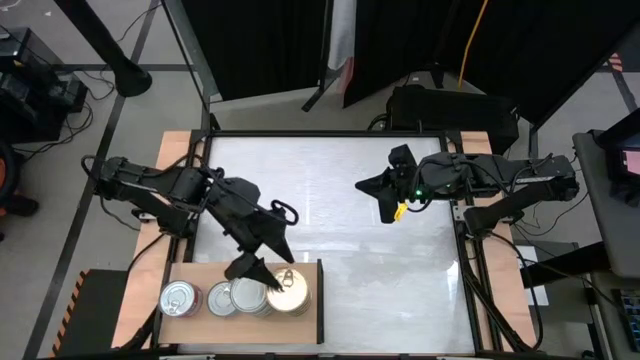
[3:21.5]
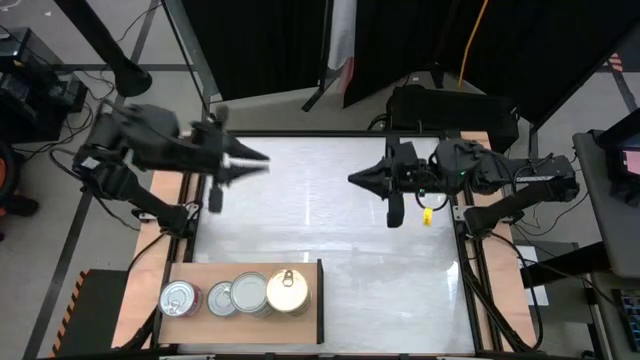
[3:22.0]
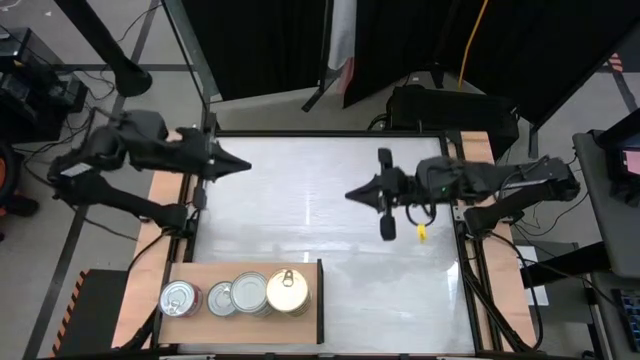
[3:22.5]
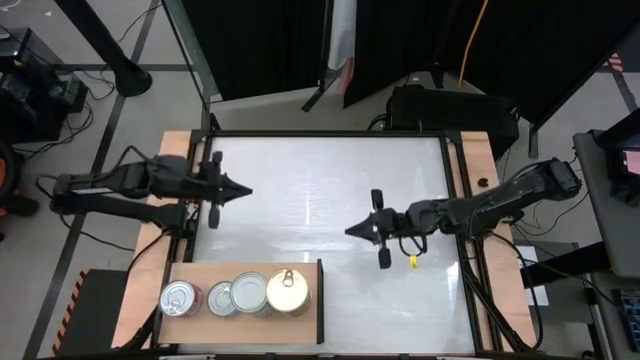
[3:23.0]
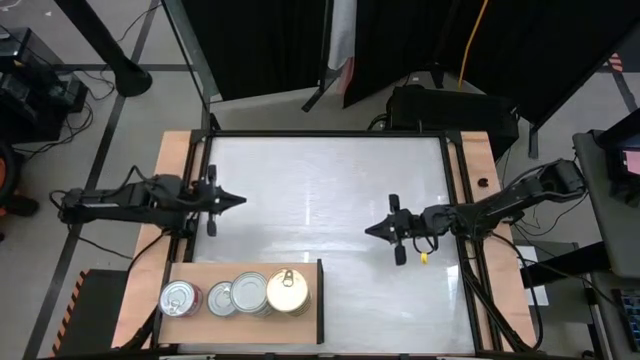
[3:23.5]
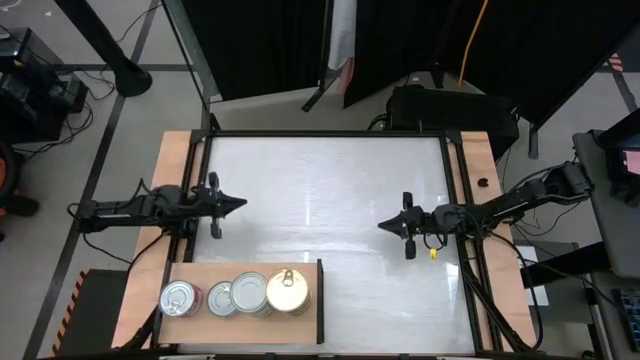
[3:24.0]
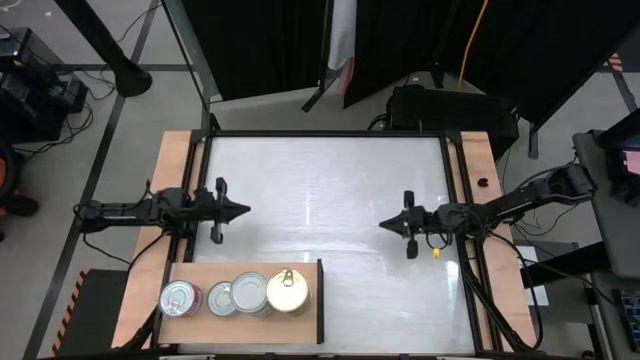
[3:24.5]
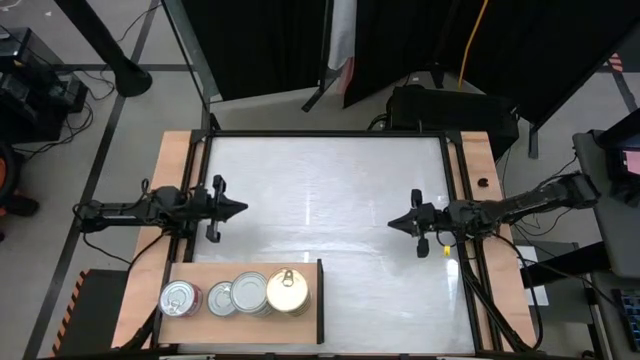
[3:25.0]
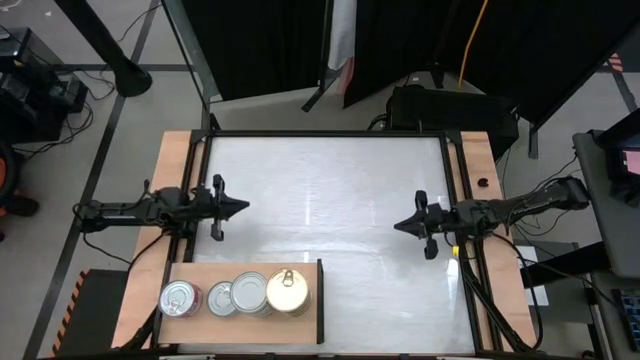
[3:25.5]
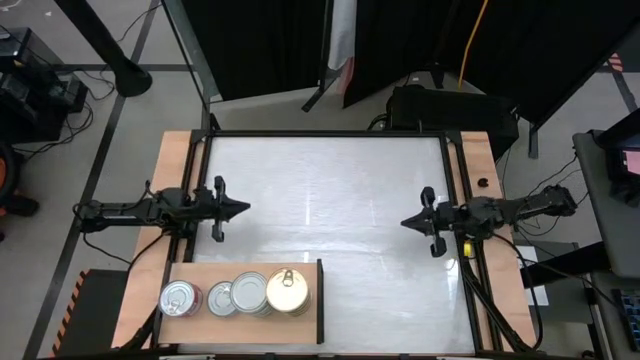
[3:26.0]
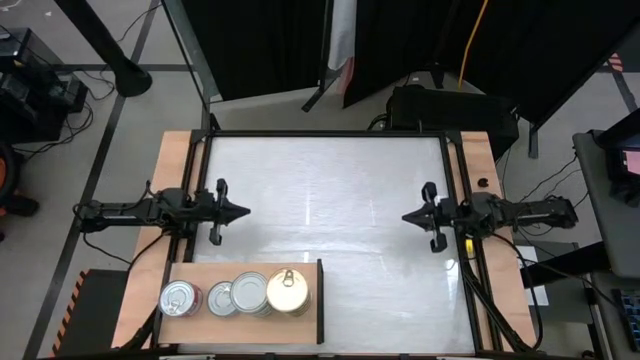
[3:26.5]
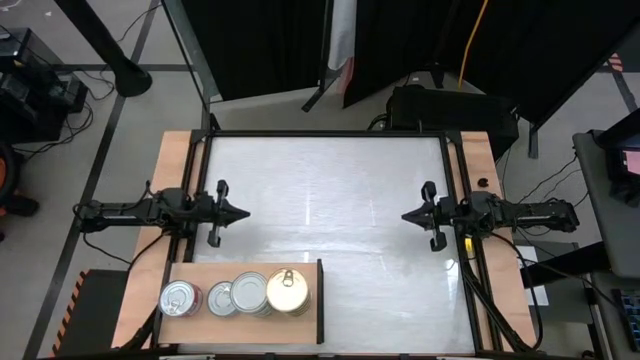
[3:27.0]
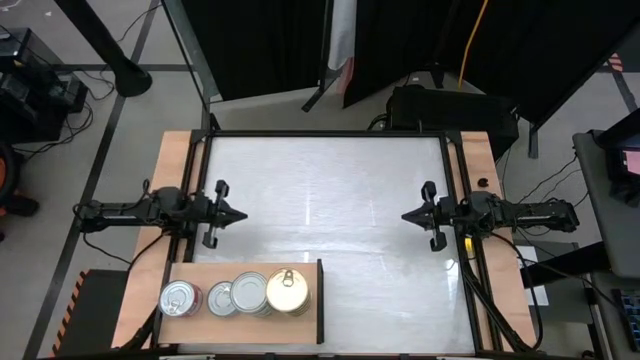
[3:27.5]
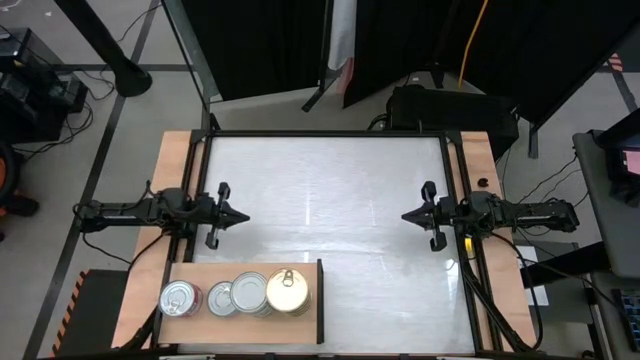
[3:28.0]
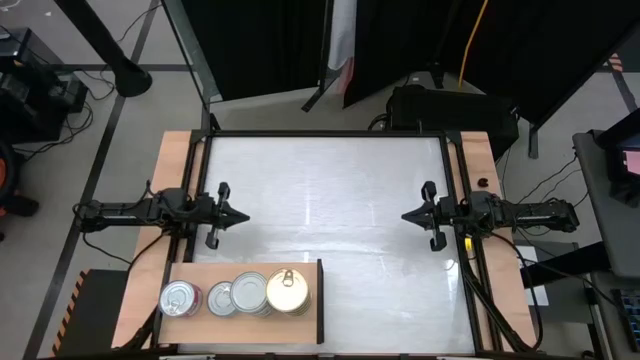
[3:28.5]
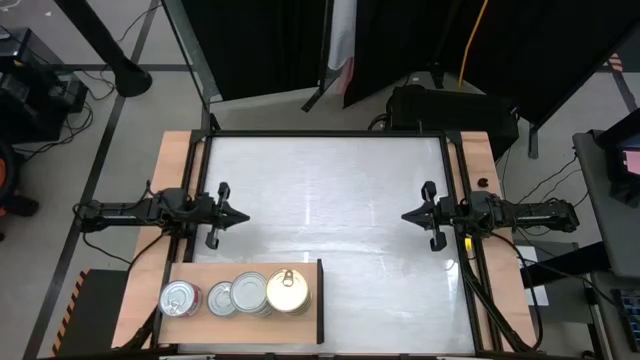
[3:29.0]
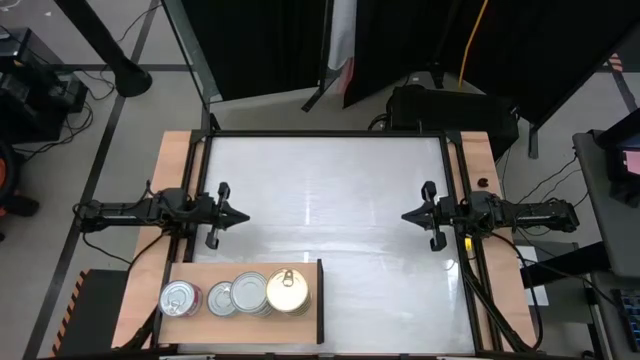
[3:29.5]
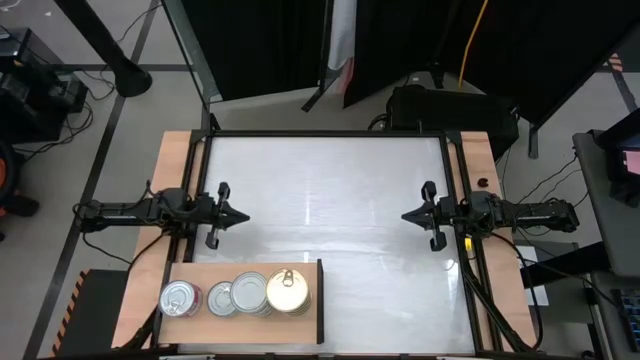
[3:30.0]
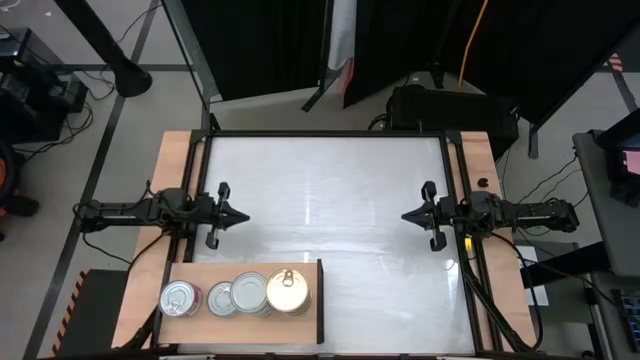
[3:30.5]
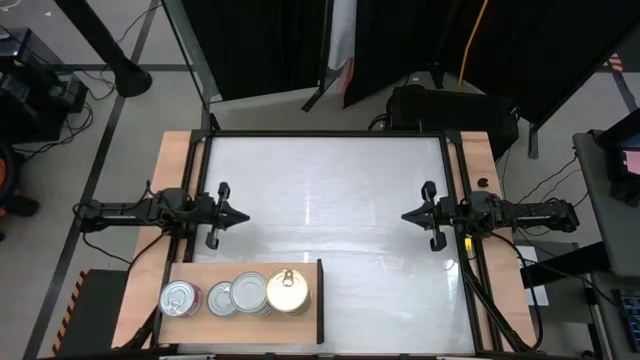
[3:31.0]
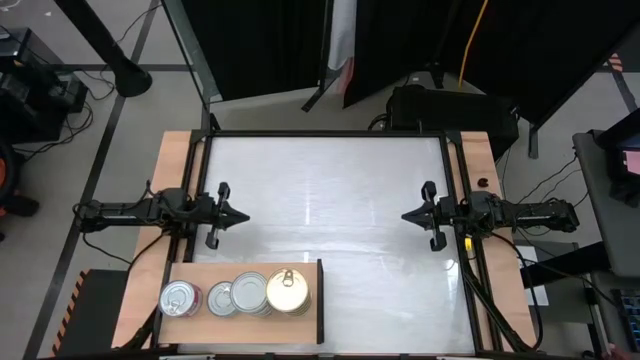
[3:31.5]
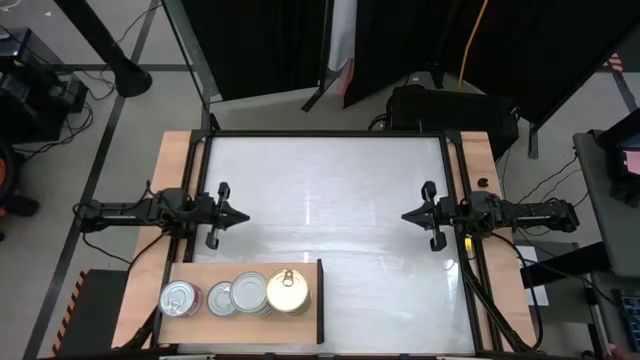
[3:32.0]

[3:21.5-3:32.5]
Task: Stack canned seafood by type on shelf
Return to Home Position

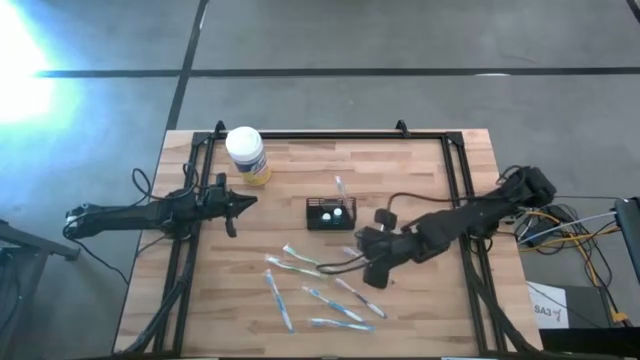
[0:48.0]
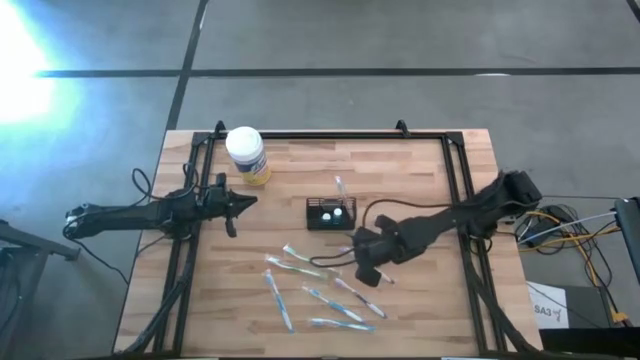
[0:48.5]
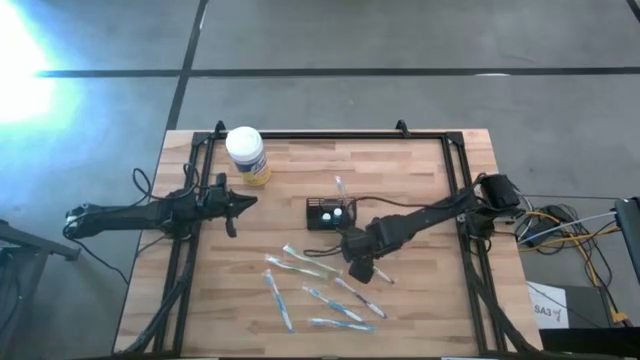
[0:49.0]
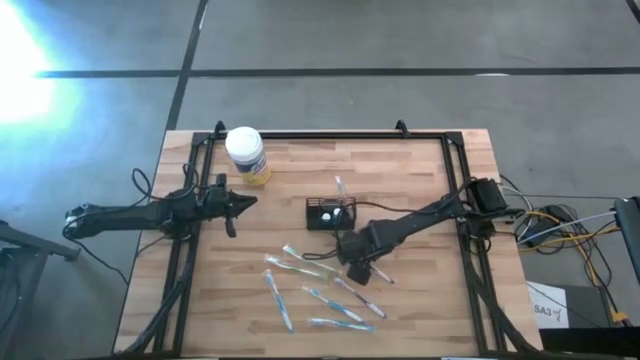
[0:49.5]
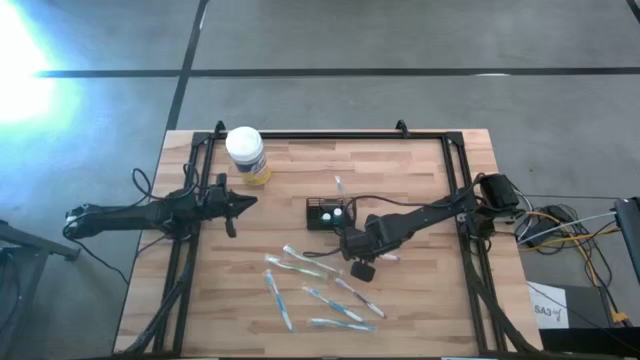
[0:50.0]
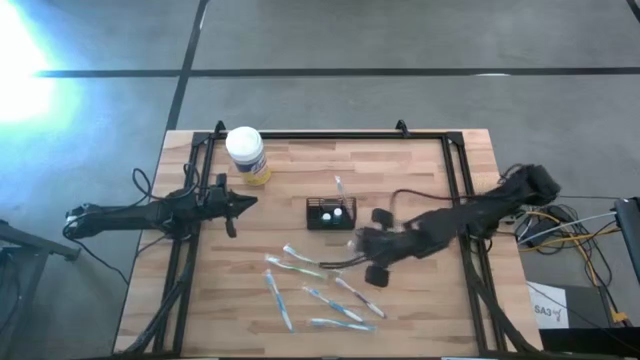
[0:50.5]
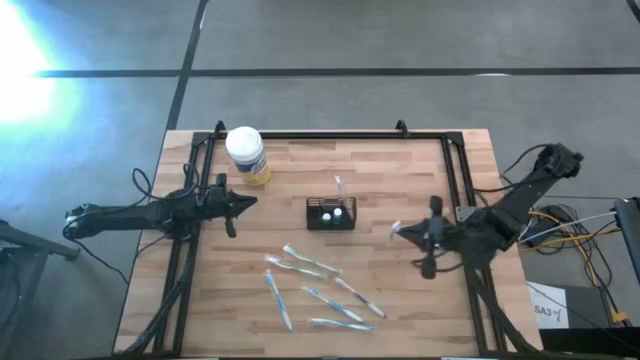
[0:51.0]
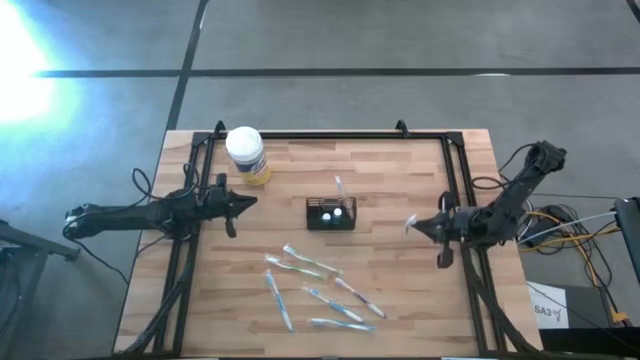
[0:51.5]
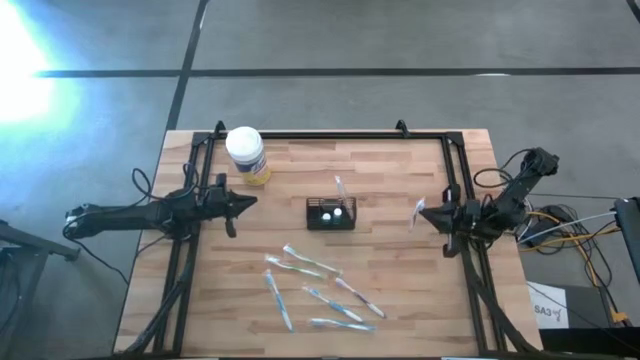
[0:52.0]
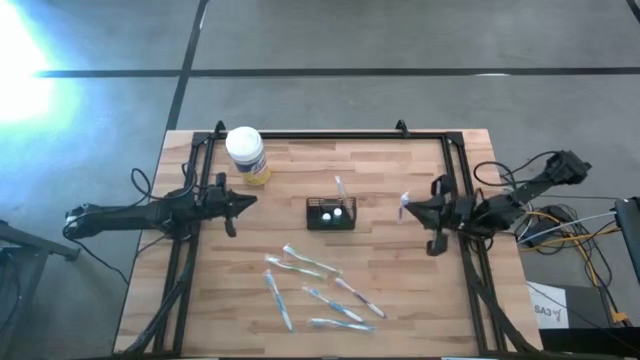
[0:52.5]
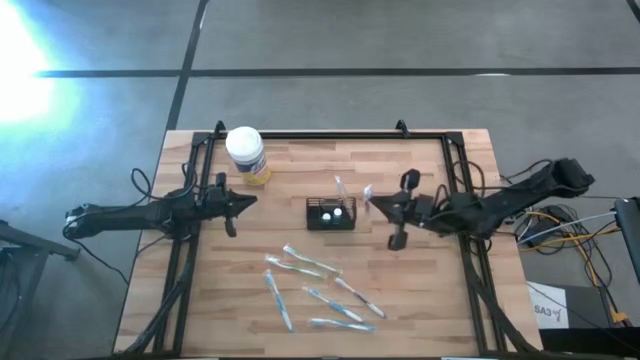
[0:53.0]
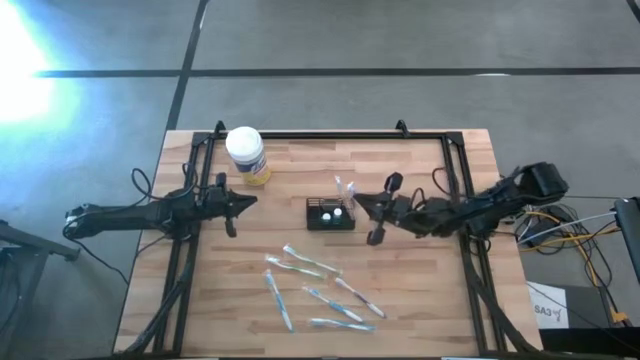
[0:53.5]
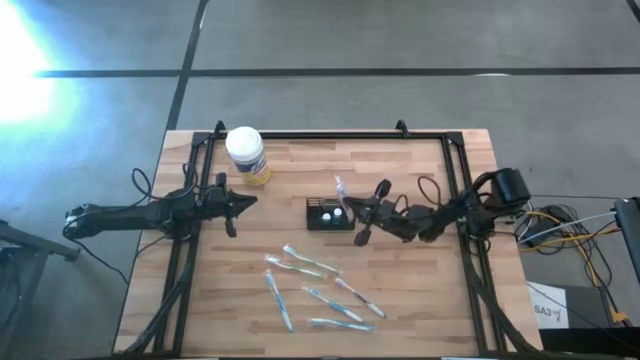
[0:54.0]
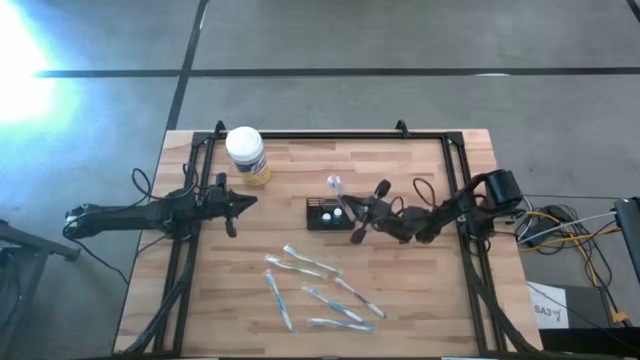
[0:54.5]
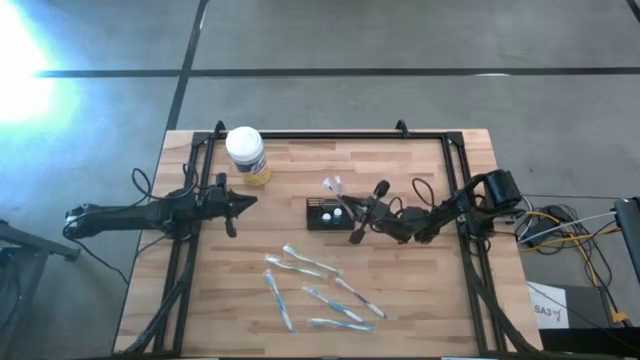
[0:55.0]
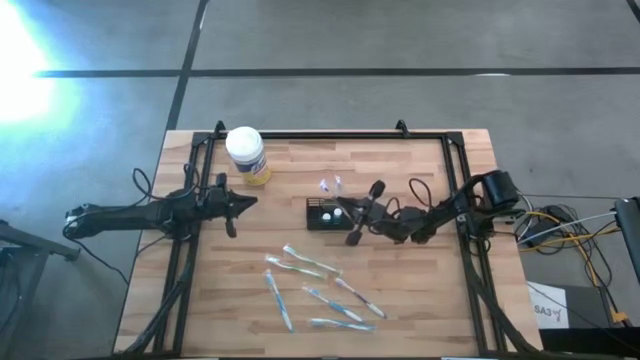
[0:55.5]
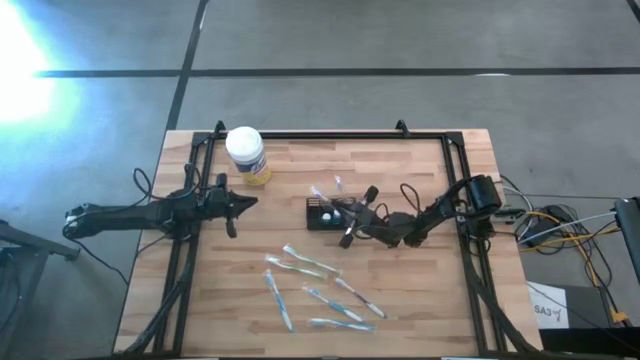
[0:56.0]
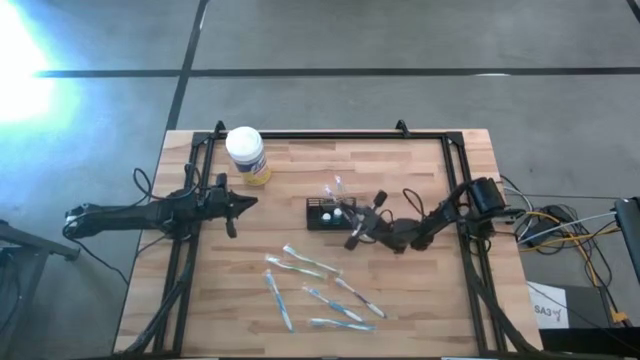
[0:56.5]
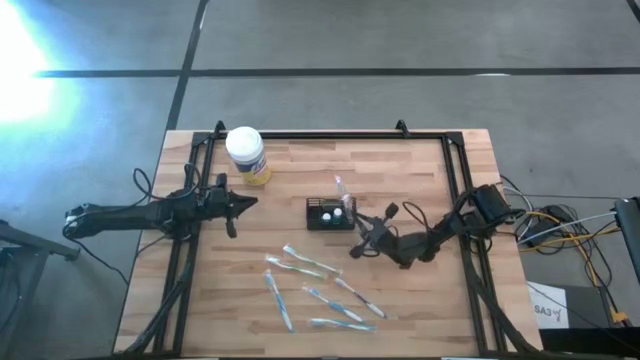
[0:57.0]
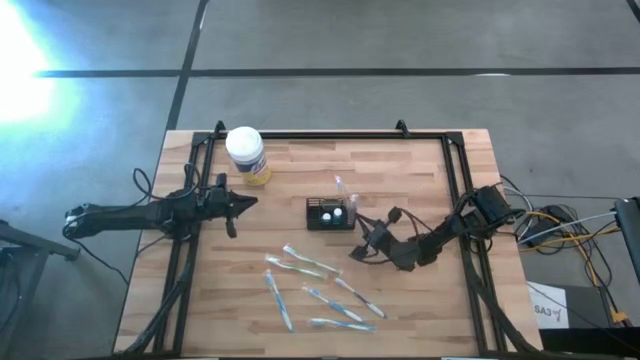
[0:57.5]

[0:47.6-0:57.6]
Task: Pick & Place toothbrushing station
Put the top purple toothbrush into the wire organizer
